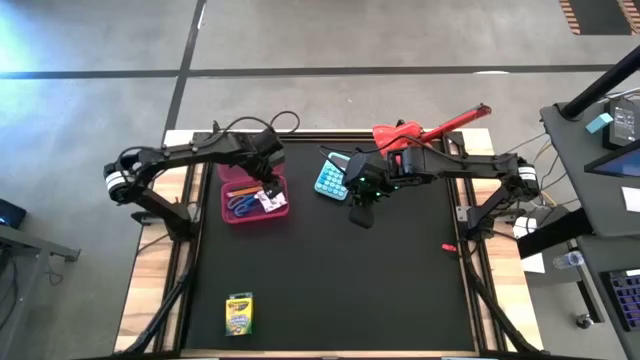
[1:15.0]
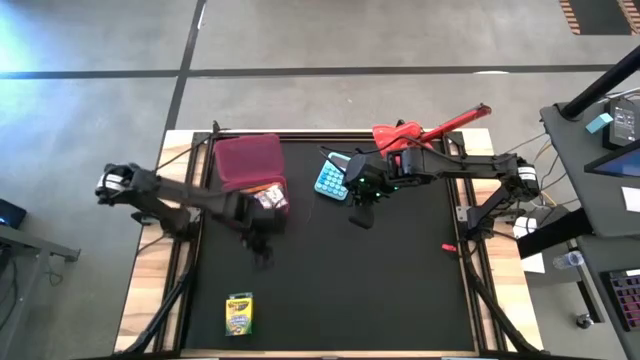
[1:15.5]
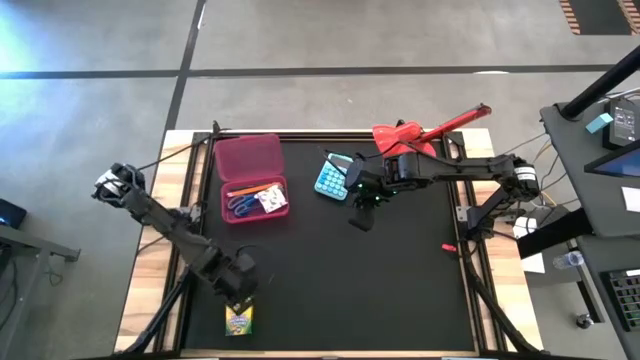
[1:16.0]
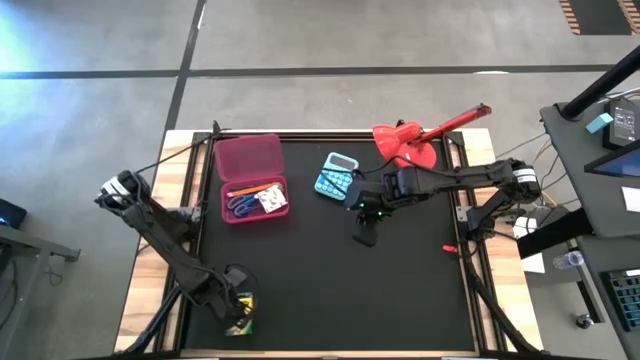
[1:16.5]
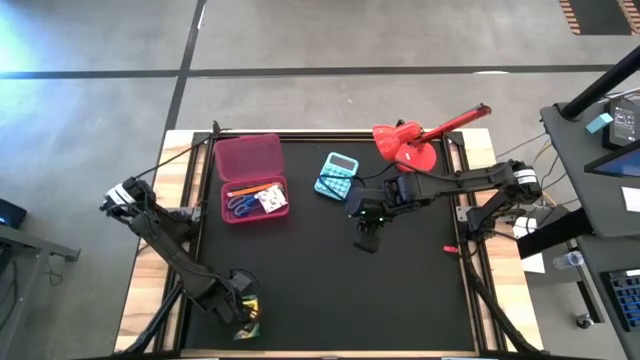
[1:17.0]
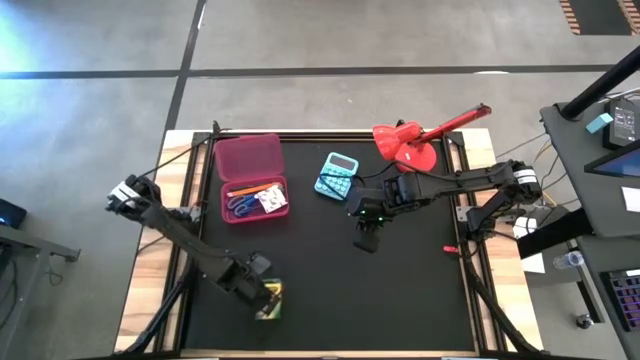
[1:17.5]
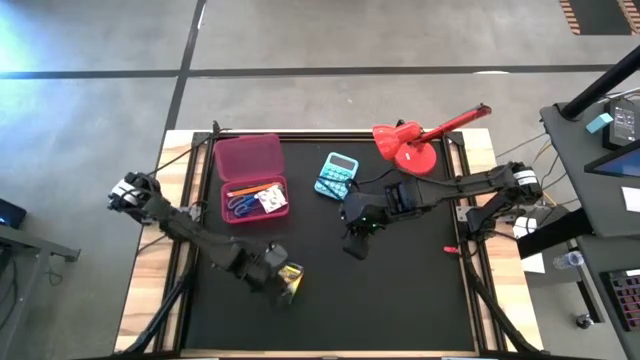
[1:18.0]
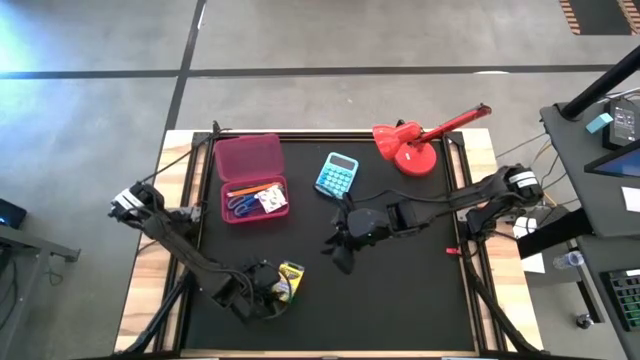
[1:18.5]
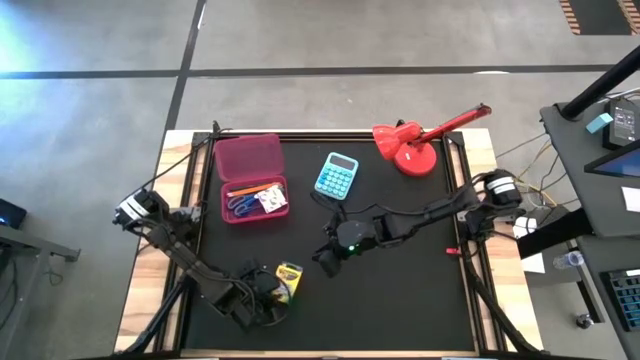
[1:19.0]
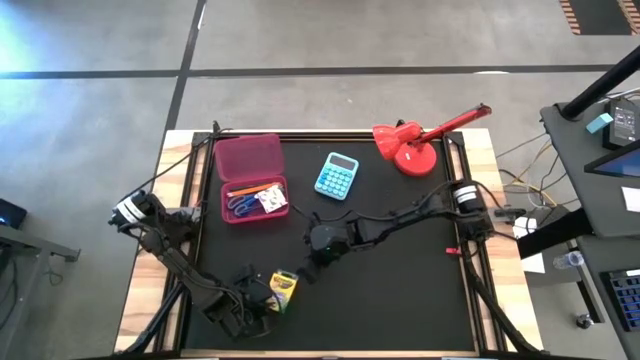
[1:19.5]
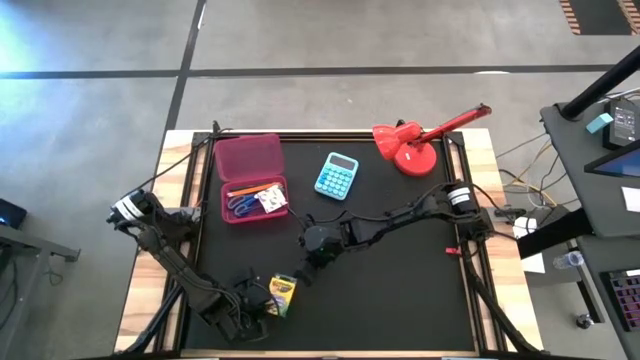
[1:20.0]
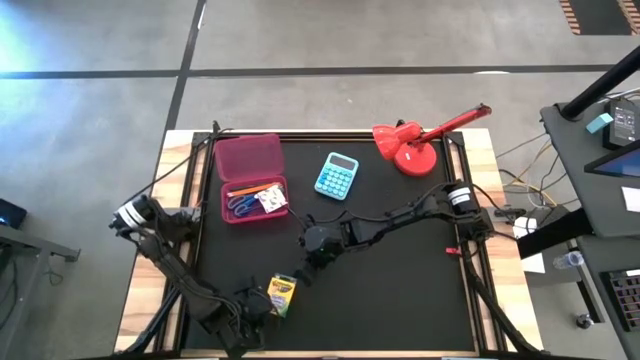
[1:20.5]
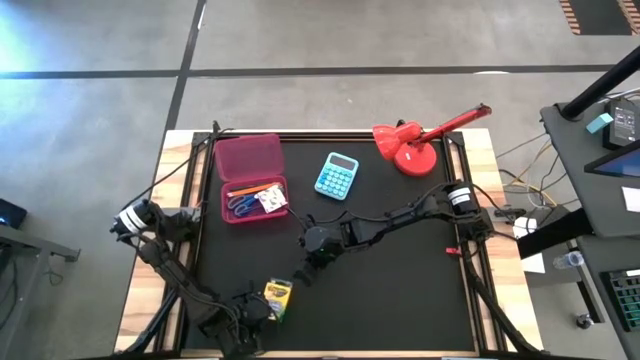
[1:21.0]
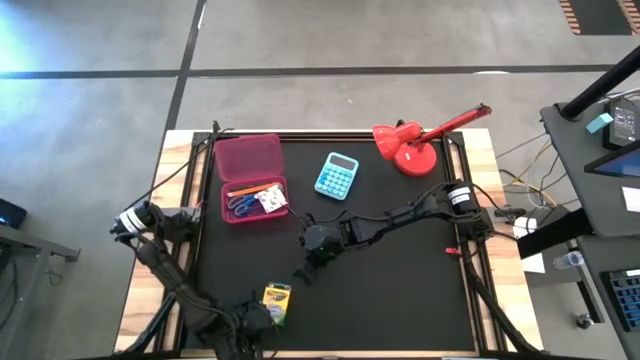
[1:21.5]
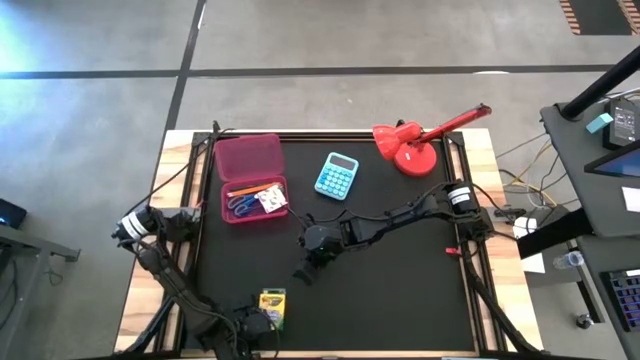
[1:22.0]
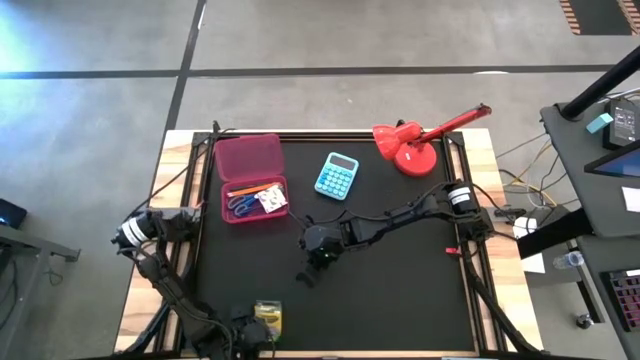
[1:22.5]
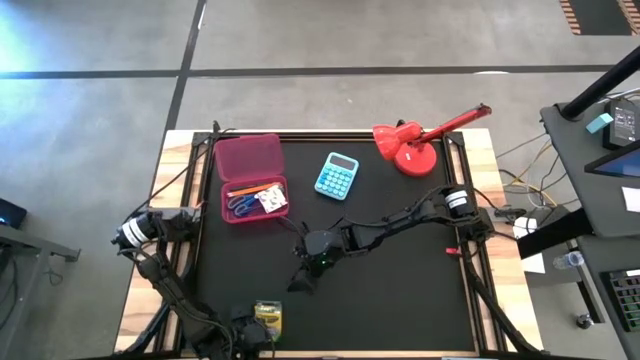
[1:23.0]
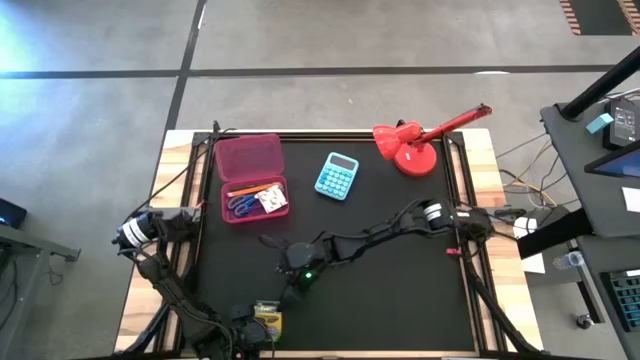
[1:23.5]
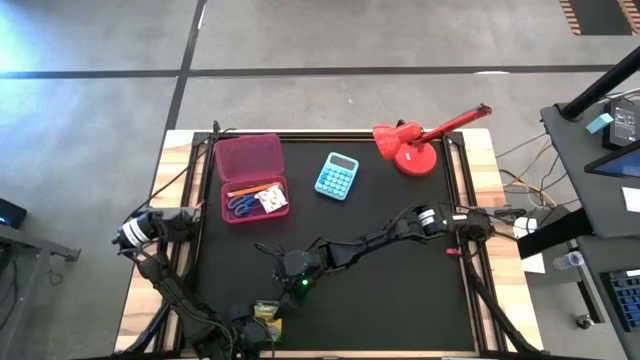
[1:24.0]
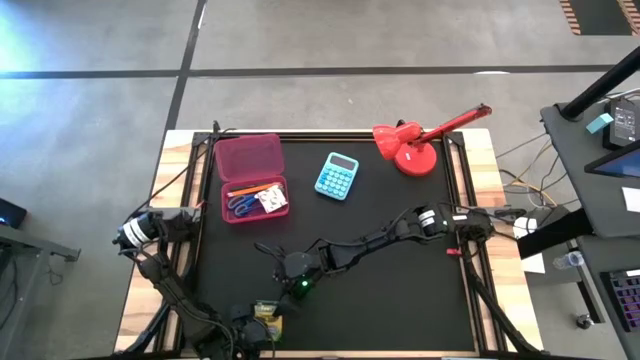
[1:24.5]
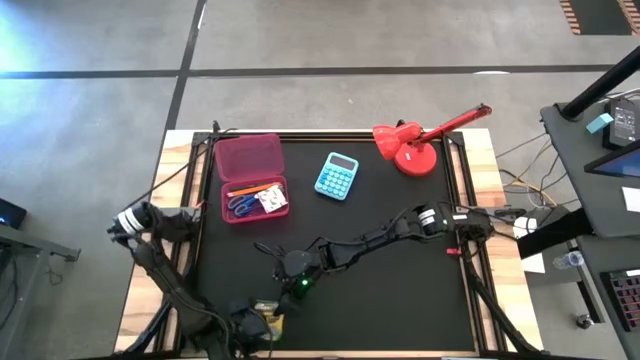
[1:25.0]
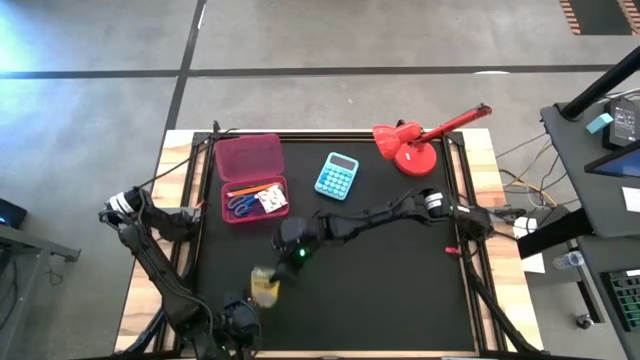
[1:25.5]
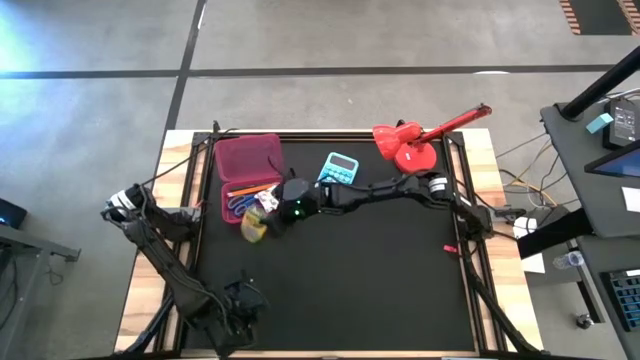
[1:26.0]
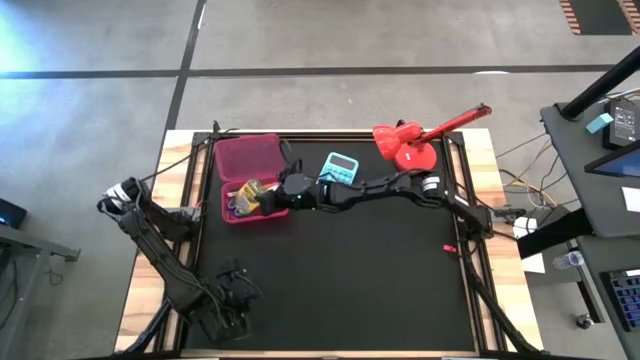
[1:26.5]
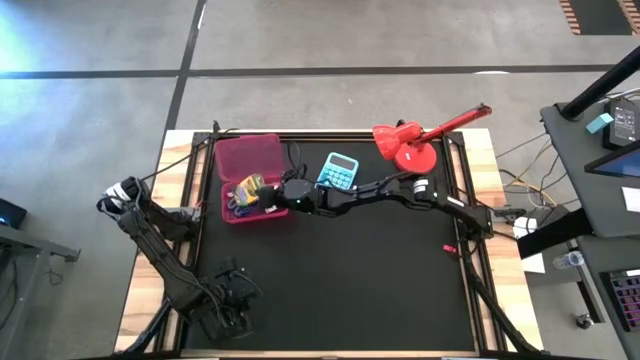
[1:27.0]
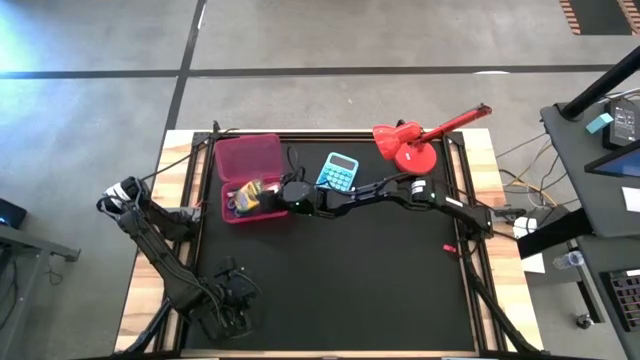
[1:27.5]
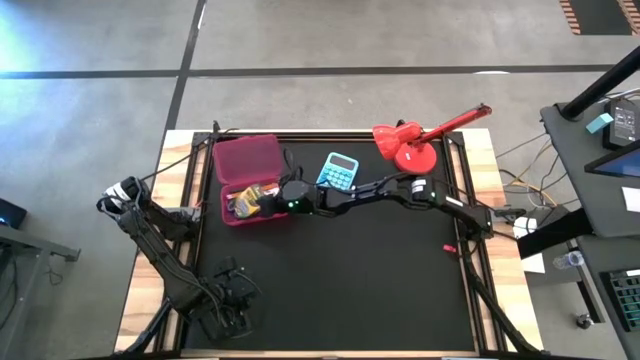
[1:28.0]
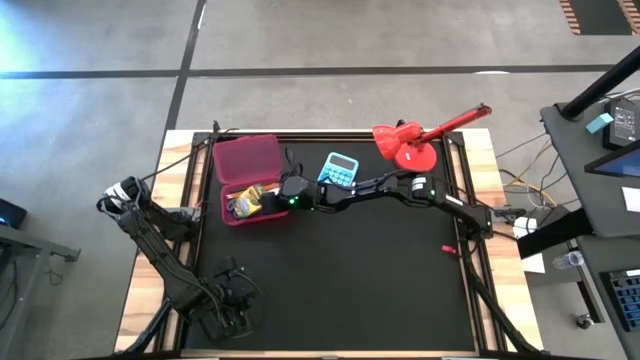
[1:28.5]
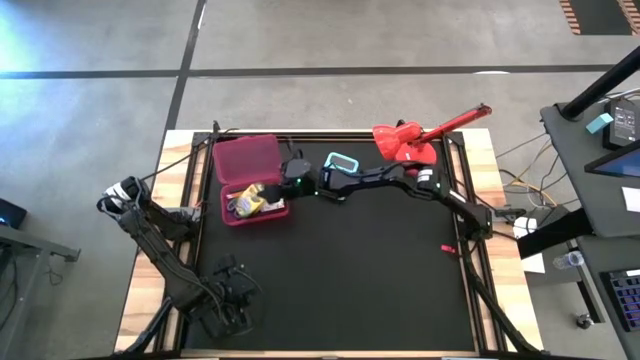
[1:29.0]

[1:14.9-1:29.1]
Task: Pack school essentials
Put the crayon box into the red supply box

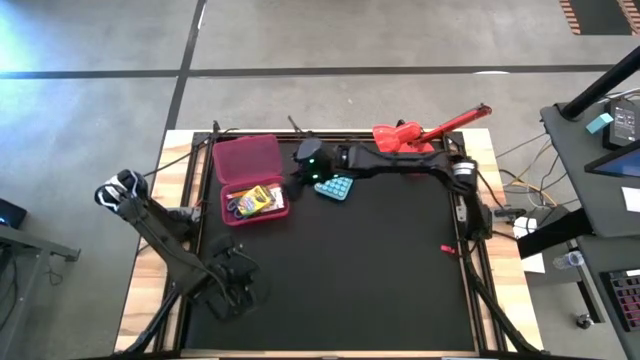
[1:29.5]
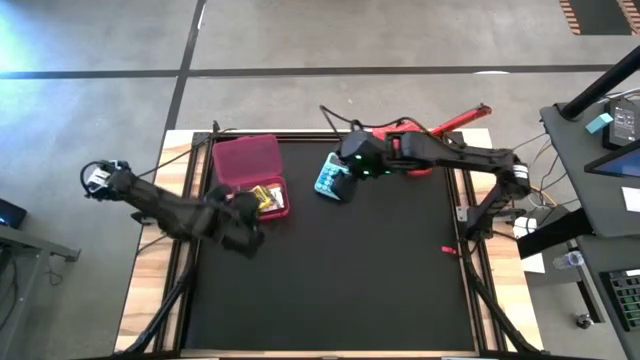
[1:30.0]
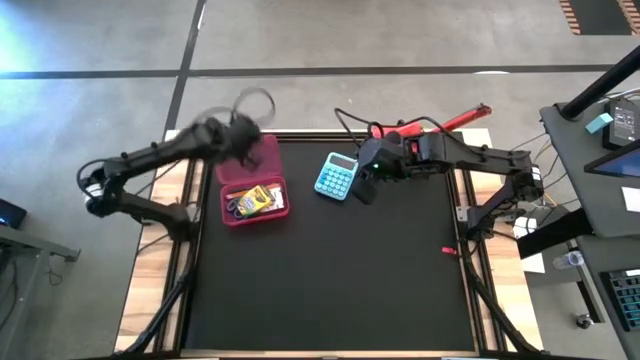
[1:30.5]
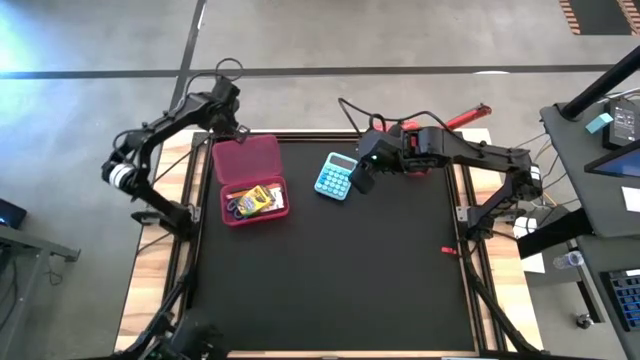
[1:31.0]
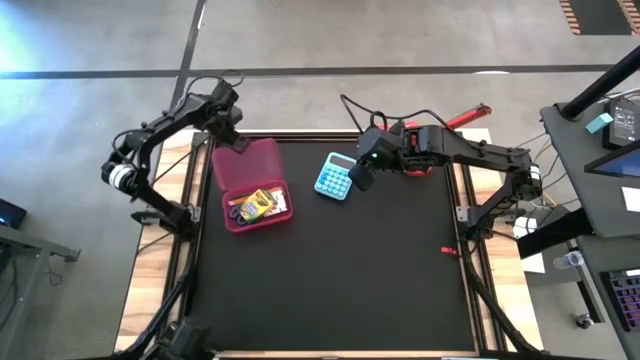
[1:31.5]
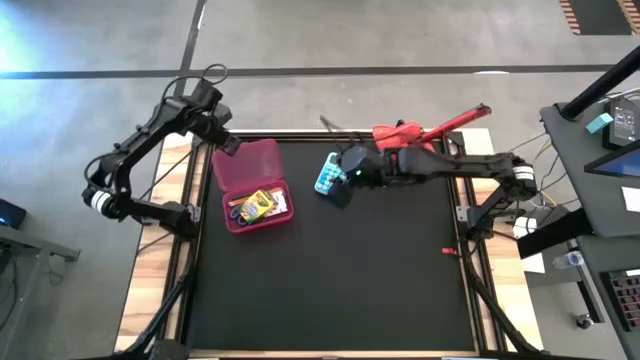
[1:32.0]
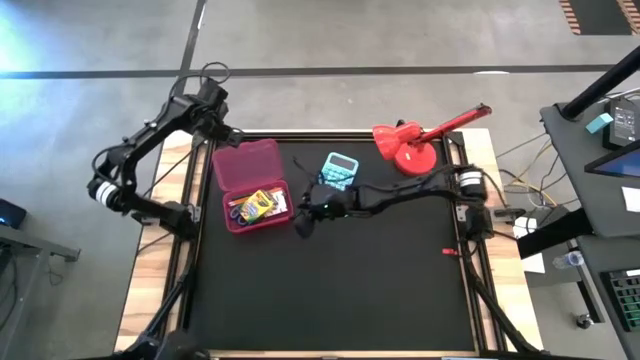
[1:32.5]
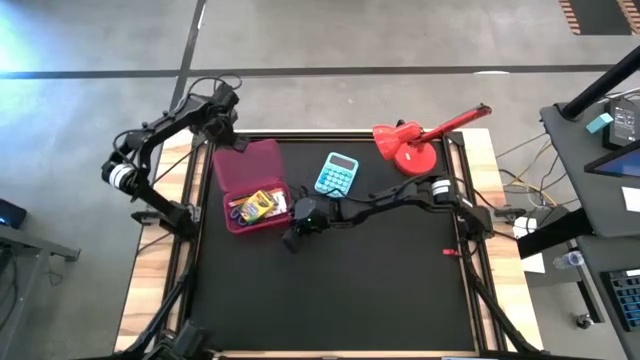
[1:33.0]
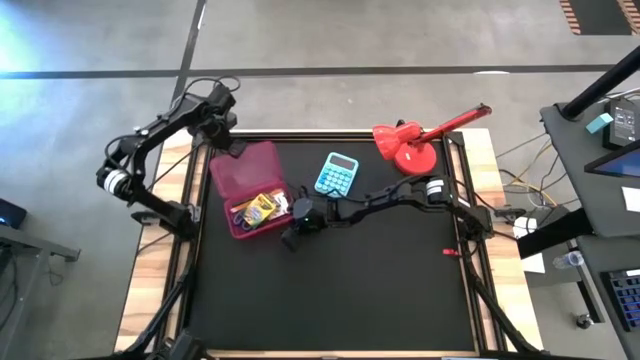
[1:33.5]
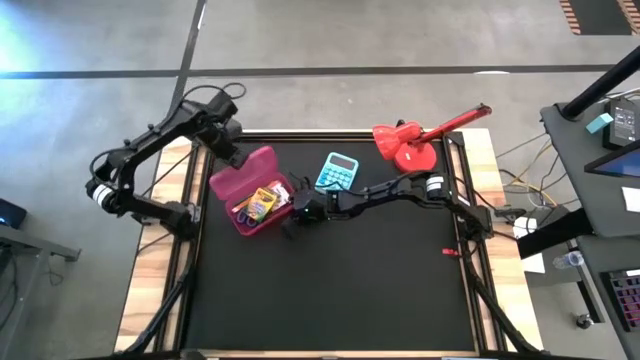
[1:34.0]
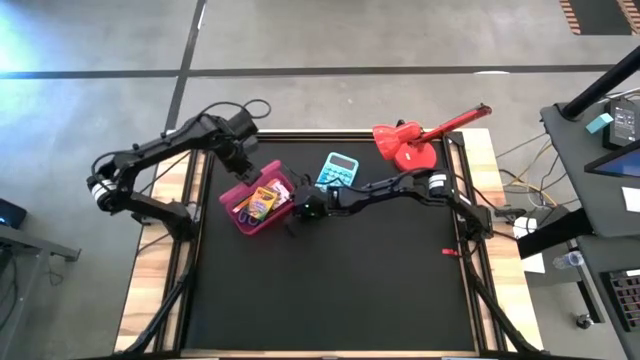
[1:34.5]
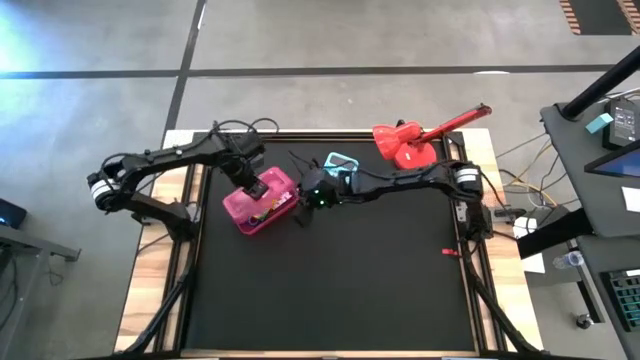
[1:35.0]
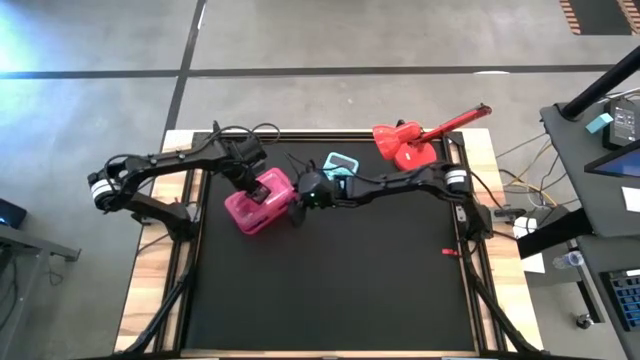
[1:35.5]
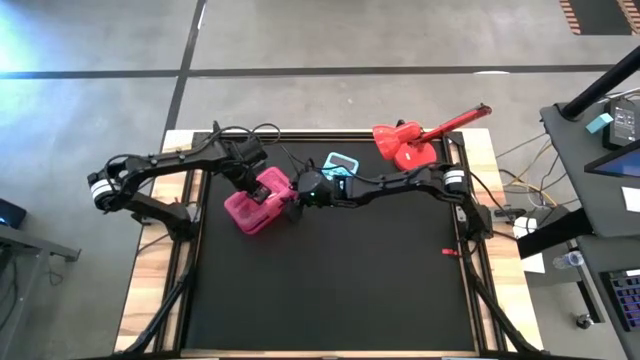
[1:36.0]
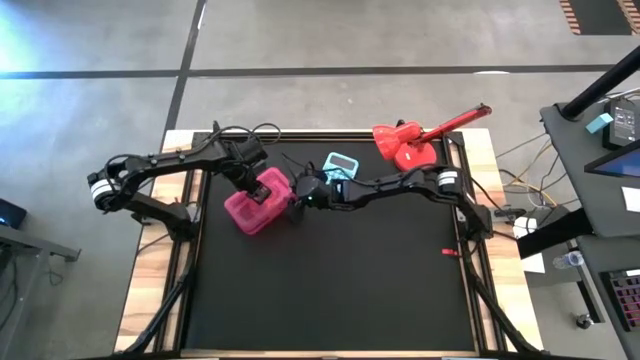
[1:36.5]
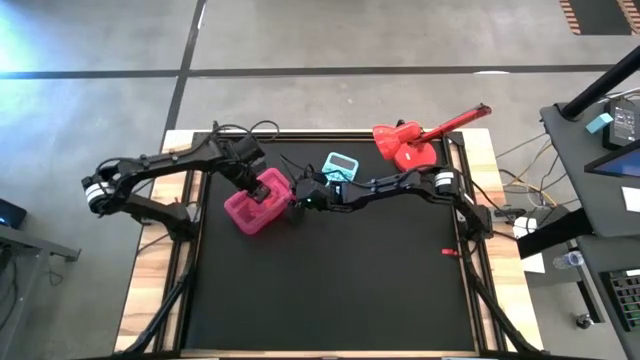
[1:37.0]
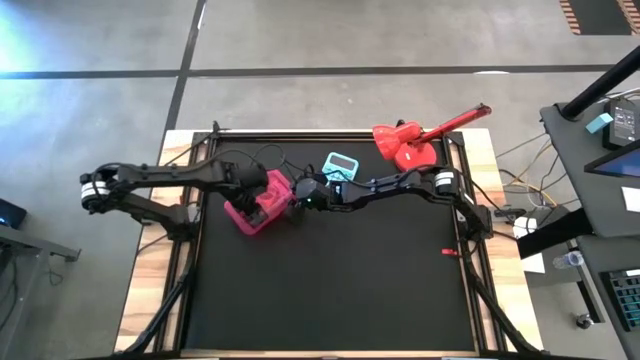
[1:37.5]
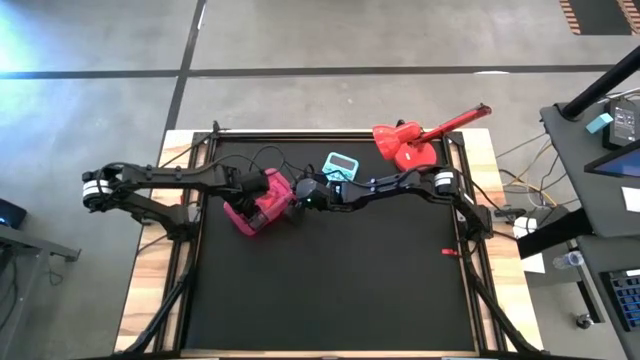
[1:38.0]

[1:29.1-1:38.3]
Close the red supply box
